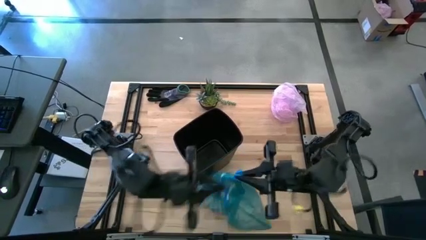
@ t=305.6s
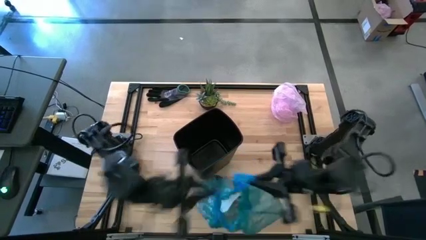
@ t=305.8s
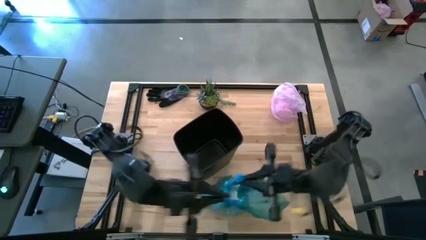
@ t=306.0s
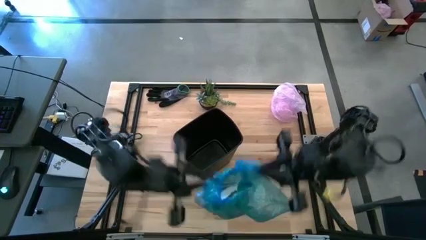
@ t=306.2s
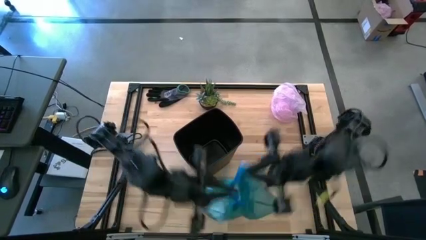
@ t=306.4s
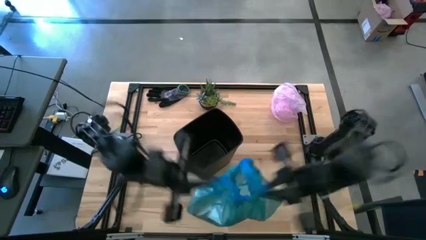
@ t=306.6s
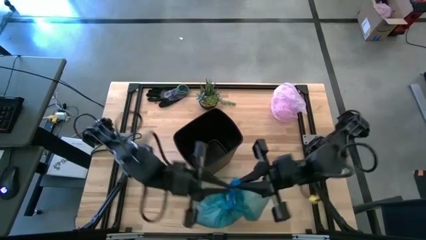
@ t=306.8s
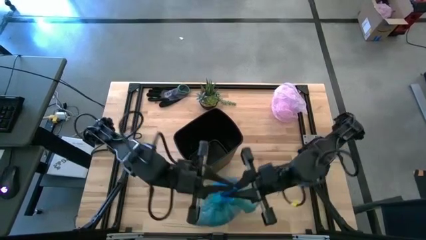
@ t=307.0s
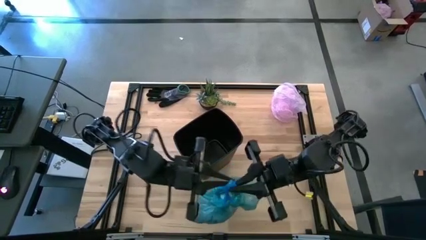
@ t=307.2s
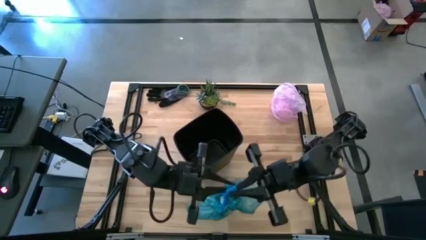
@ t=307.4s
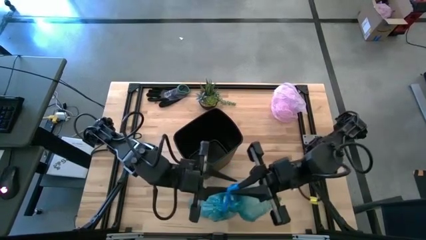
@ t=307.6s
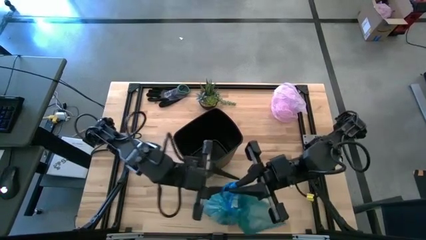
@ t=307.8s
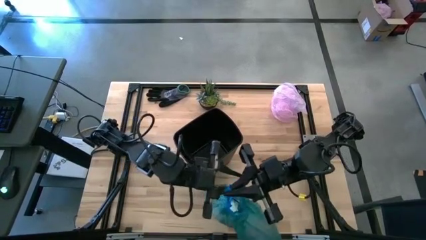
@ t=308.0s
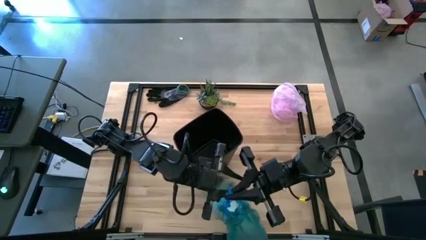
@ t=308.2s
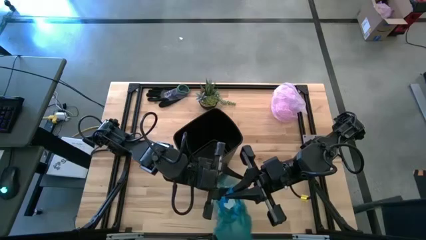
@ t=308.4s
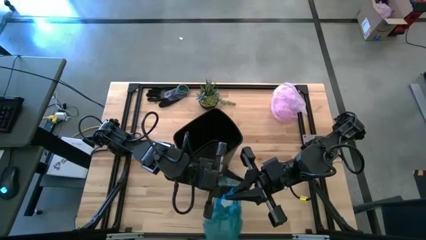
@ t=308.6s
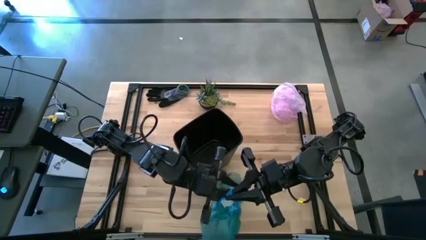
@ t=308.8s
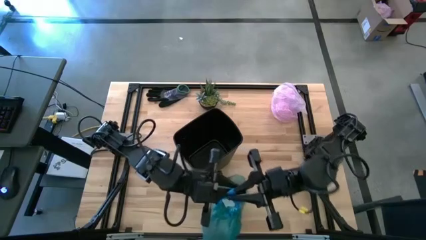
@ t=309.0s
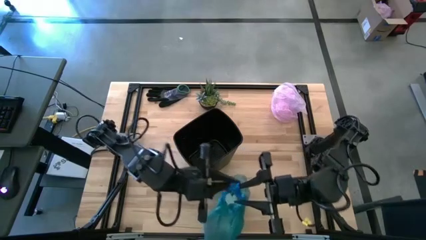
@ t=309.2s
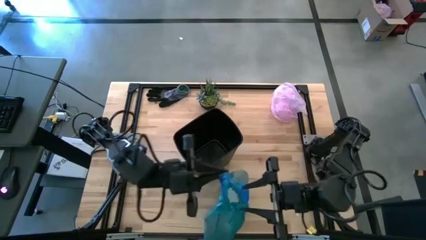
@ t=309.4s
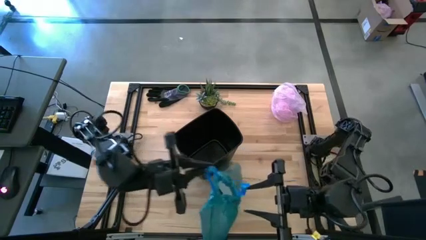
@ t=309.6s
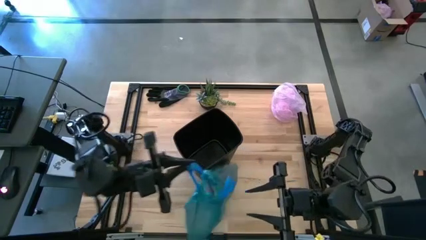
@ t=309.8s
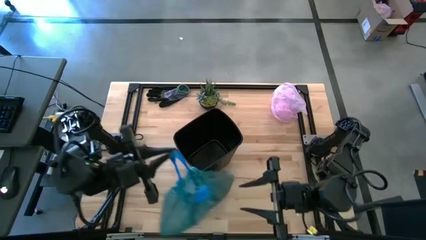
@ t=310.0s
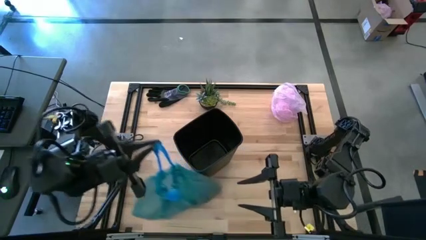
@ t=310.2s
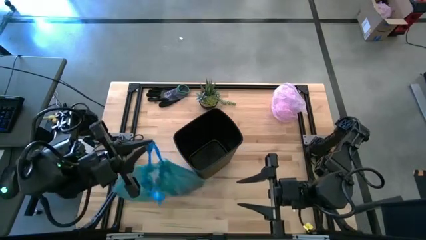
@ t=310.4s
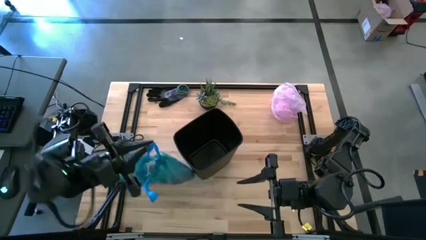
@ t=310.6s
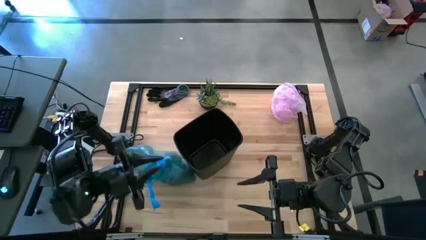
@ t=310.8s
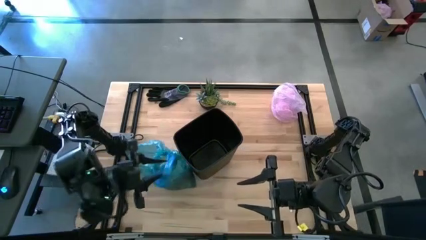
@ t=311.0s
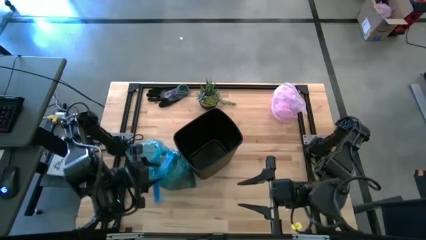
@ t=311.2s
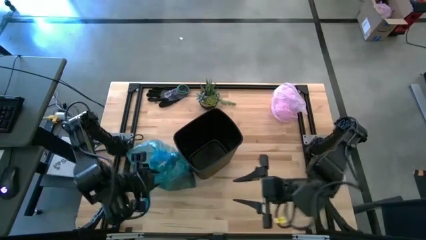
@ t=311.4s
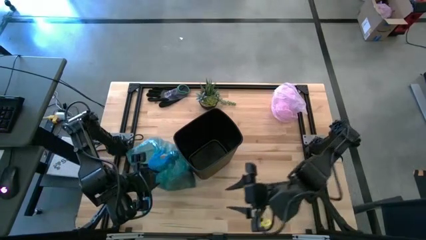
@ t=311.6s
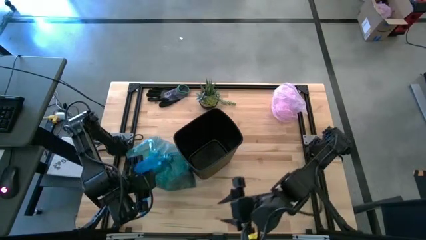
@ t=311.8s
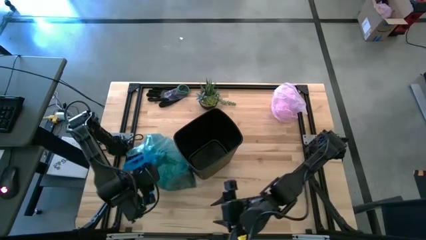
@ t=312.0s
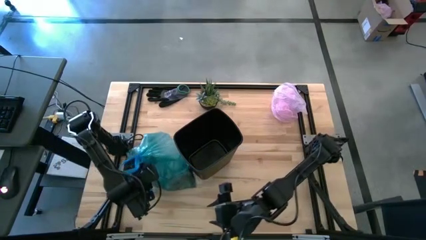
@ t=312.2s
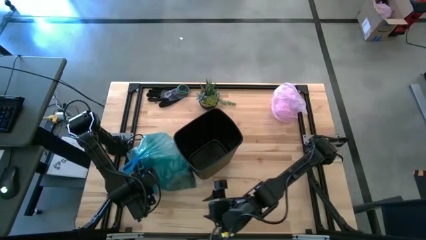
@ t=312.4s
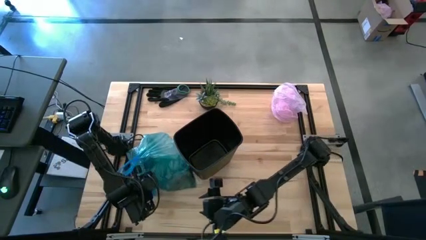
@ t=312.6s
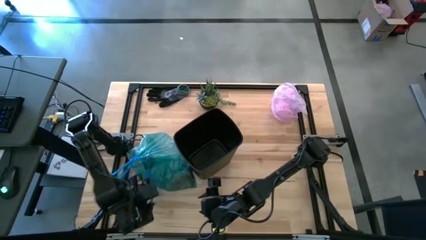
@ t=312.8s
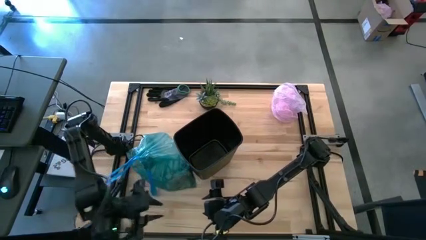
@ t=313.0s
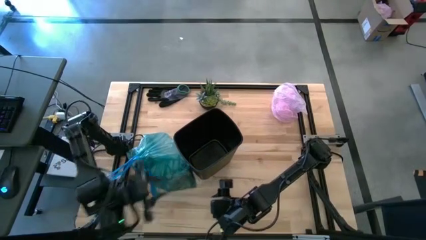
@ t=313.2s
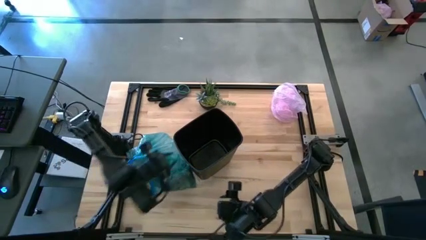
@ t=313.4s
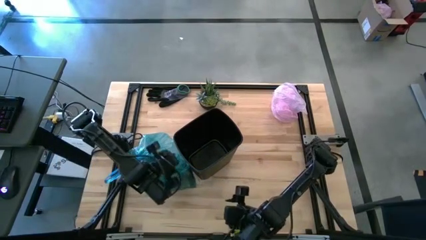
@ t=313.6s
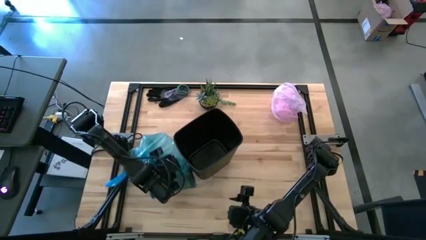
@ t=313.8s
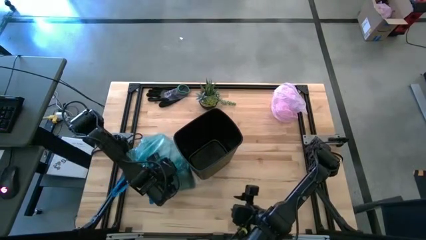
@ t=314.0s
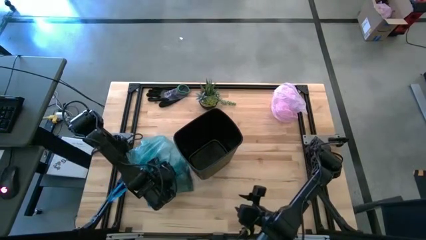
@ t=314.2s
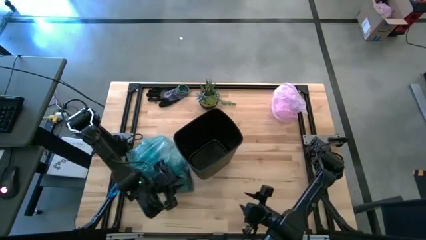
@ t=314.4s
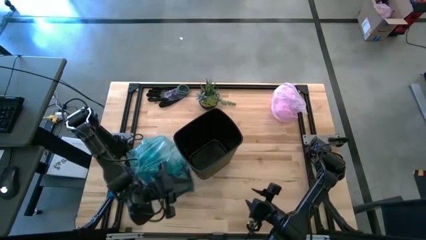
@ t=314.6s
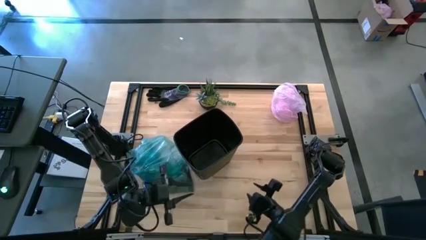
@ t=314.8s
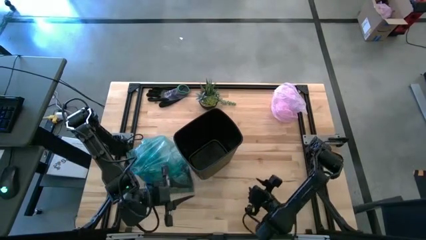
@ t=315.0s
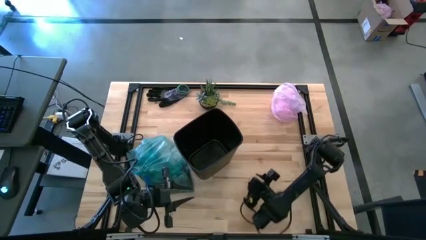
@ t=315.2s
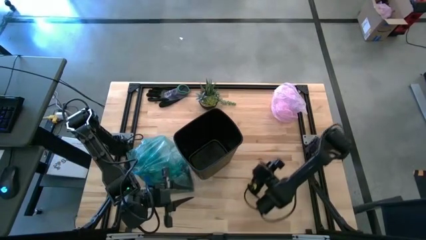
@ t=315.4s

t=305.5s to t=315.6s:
Task: place trash/remove bag and relplace
Close the blue trash bag
